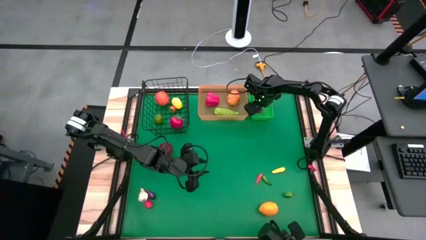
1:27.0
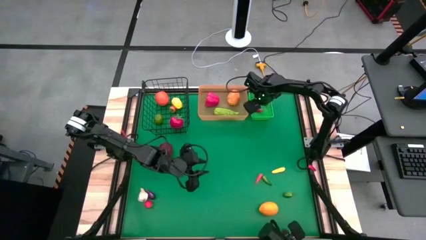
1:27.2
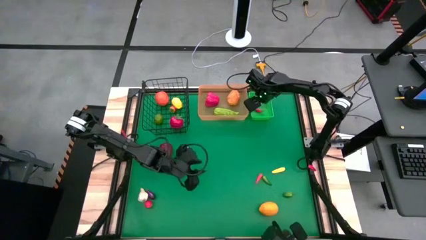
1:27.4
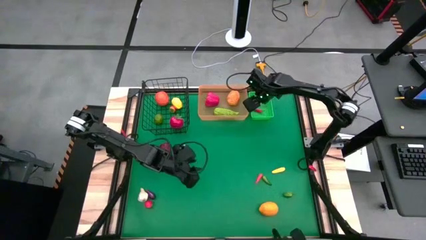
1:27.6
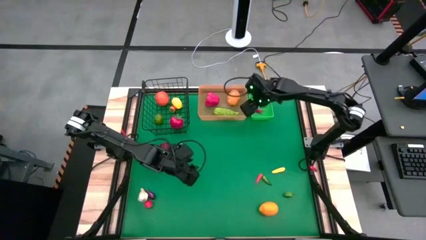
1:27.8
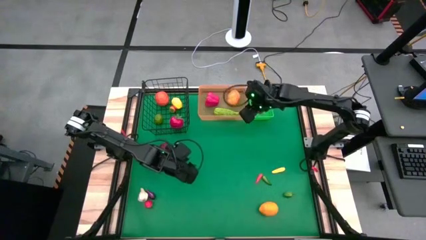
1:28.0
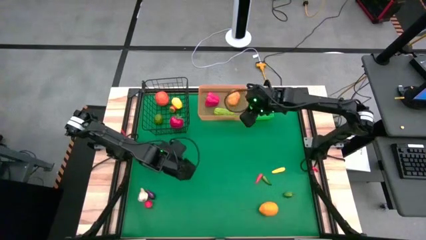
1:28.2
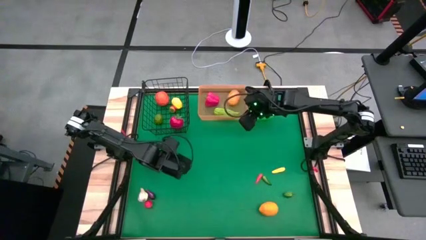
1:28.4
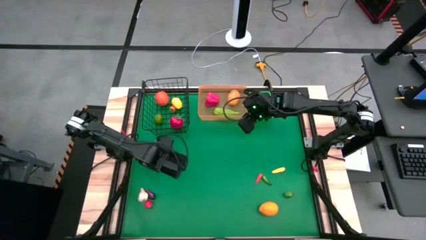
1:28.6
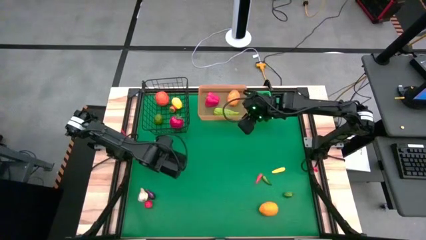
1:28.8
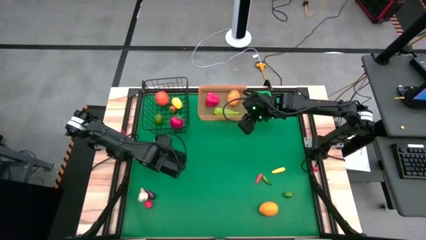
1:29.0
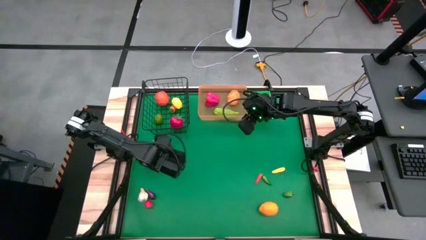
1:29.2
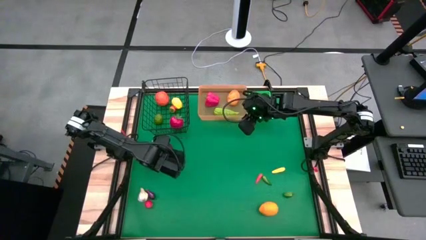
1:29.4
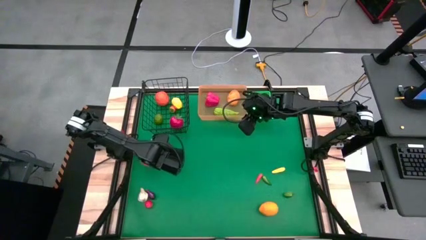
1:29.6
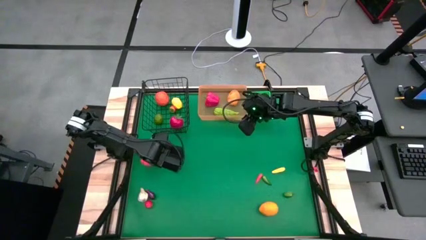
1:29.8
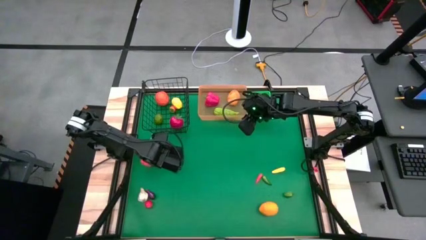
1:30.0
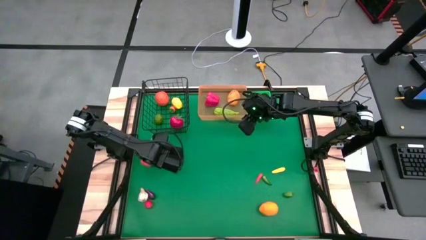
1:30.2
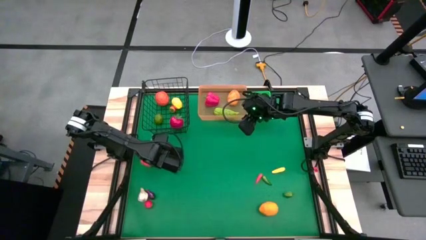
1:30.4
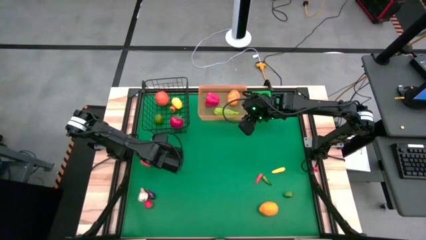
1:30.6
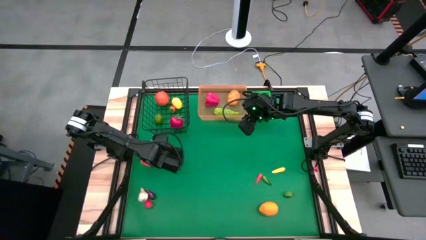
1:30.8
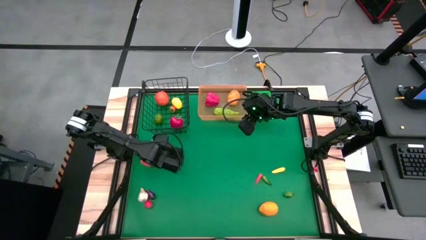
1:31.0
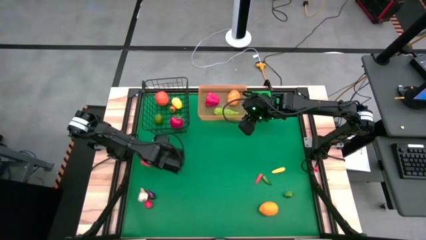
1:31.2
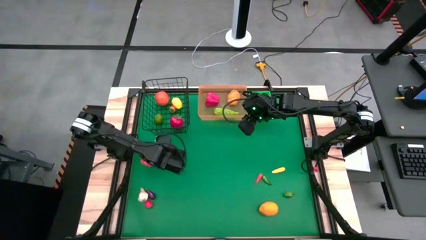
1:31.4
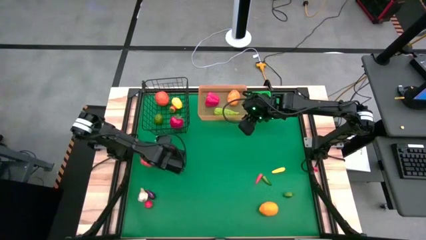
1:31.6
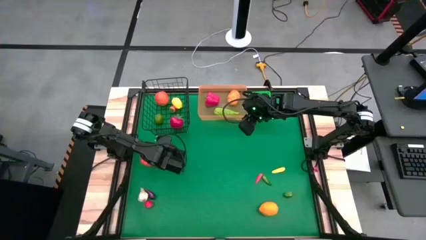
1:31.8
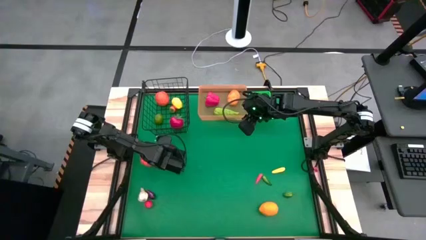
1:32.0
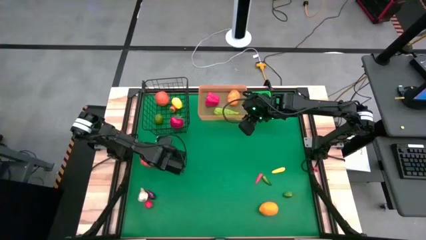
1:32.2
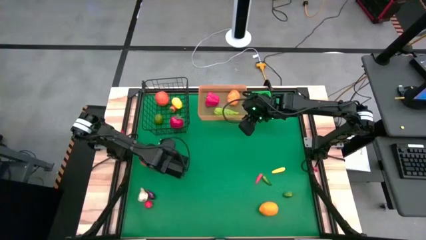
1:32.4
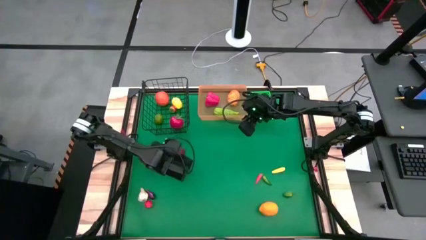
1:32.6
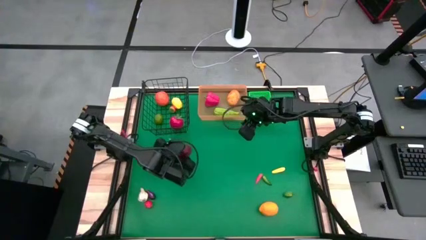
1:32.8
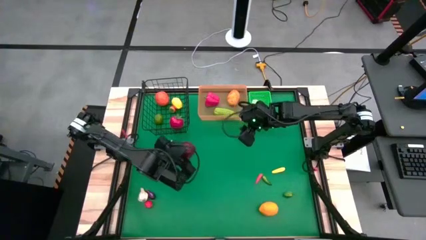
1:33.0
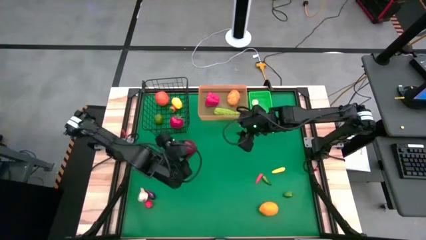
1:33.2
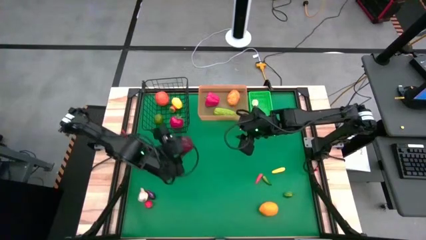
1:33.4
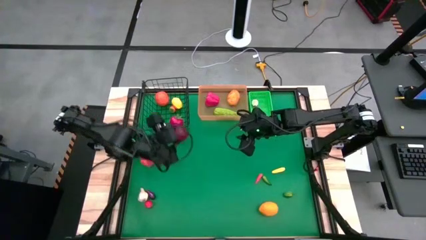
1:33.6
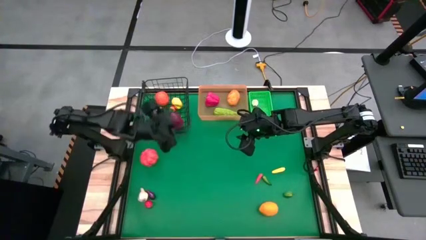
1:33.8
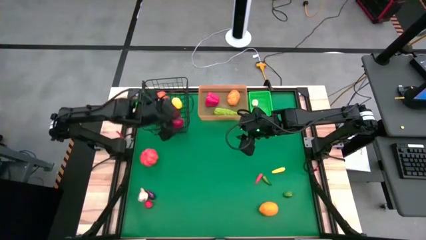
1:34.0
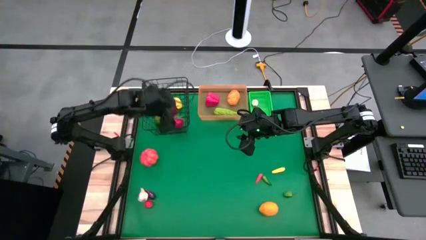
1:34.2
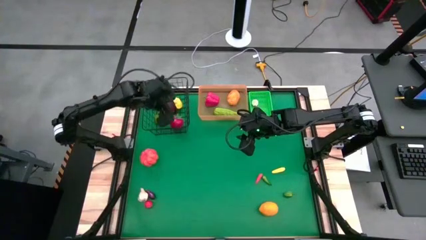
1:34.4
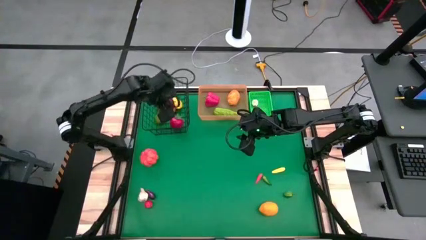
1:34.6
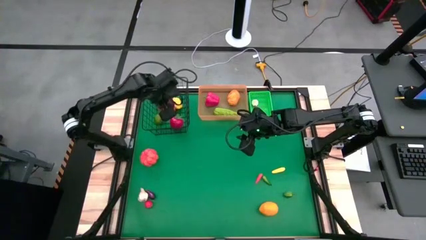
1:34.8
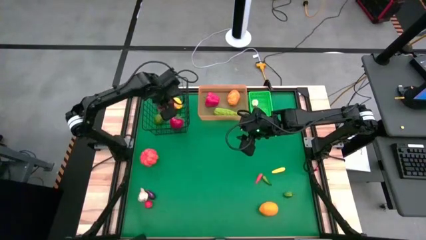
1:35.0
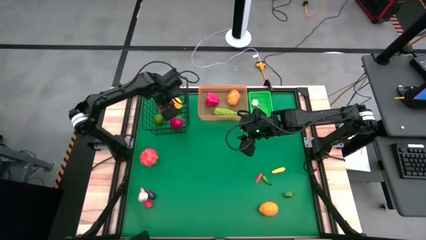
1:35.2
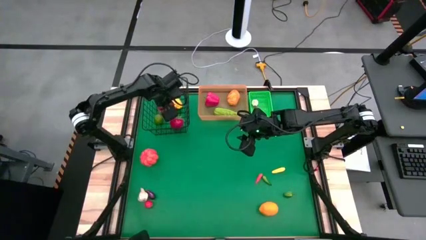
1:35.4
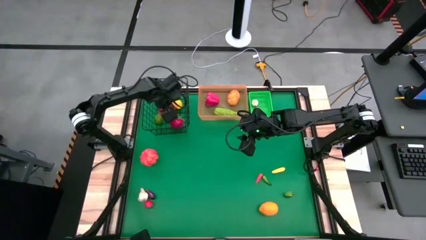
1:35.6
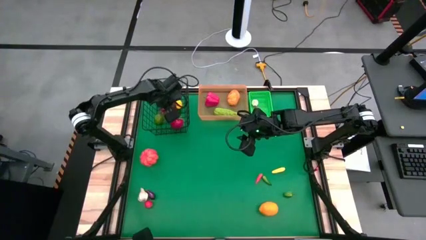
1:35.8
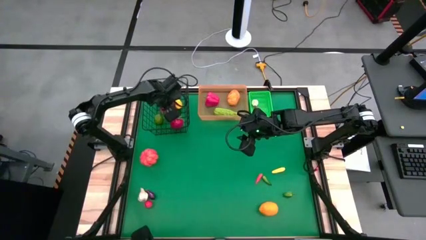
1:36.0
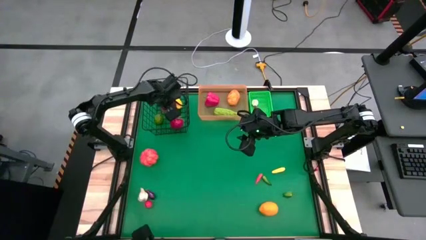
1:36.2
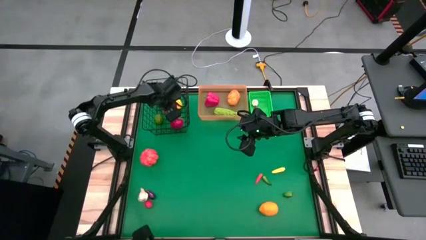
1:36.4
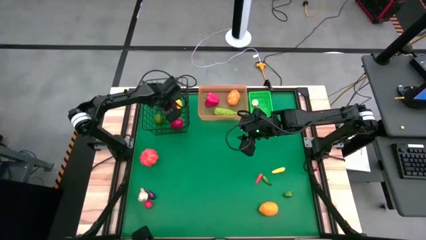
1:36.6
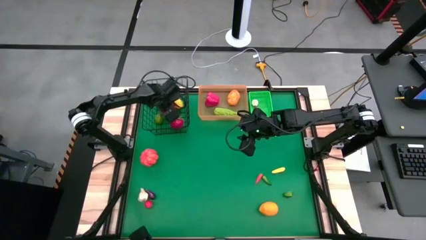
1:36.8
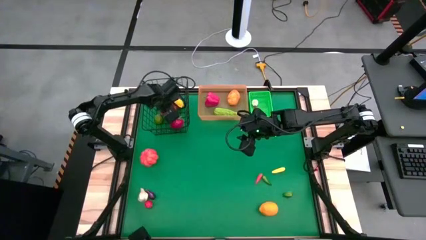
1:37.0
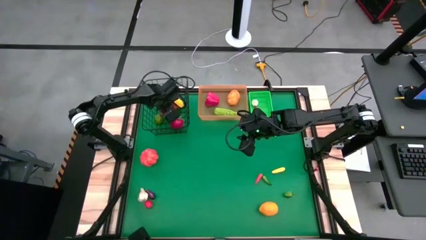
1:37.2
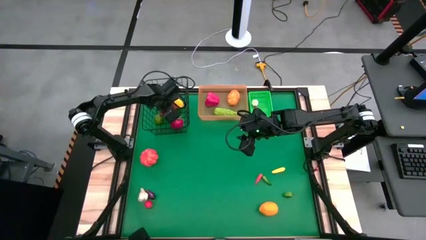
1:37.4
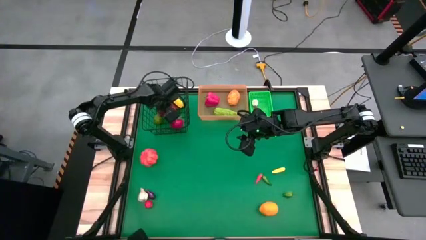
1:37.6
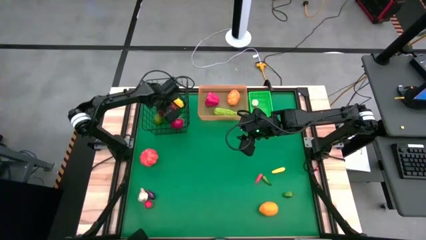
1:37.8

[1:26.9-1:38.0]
Task: Sort produce into baskets
Put the red apple into the black wire basket

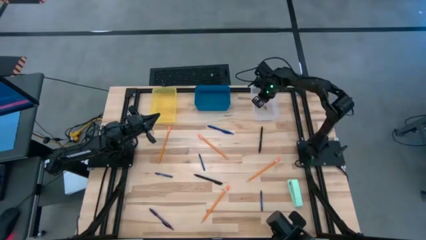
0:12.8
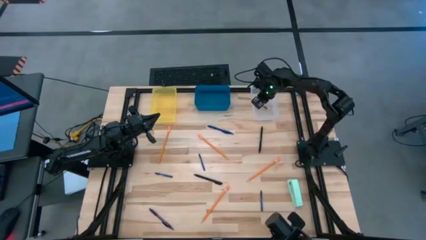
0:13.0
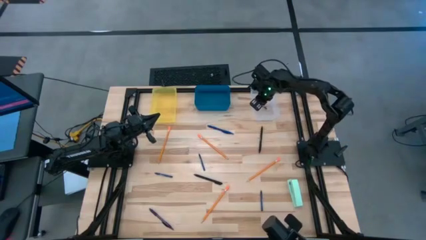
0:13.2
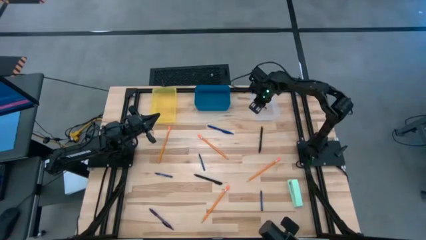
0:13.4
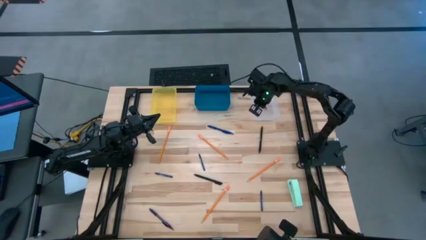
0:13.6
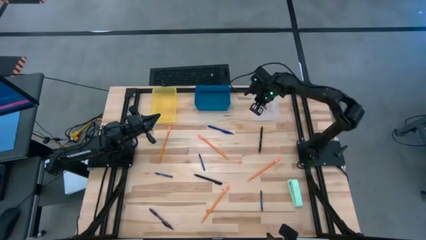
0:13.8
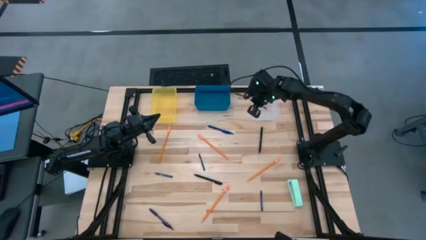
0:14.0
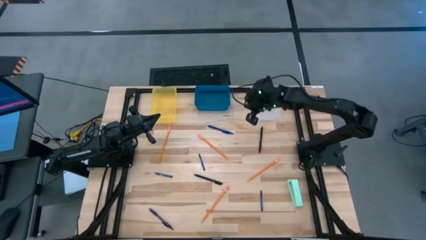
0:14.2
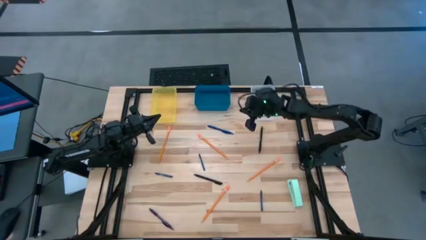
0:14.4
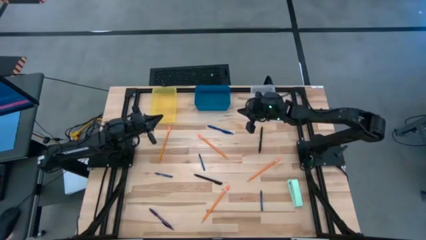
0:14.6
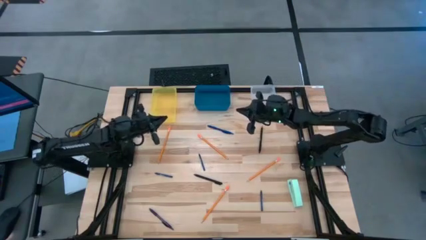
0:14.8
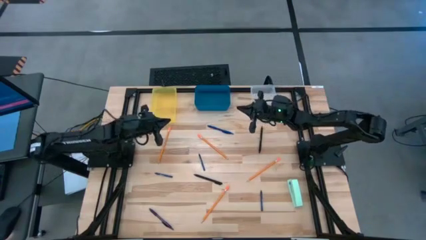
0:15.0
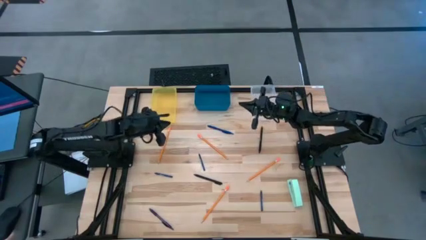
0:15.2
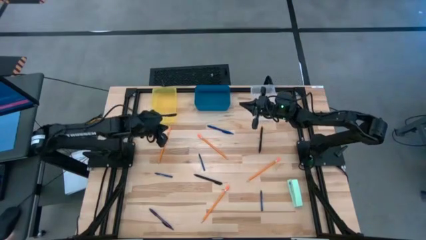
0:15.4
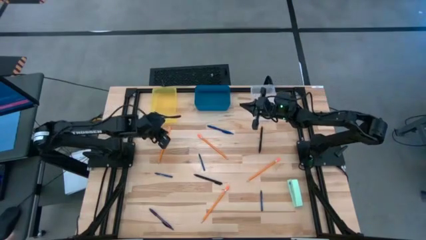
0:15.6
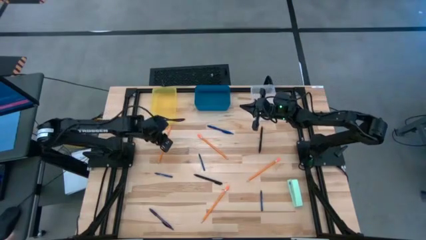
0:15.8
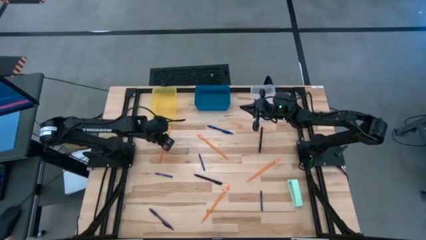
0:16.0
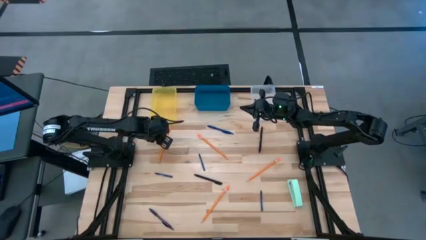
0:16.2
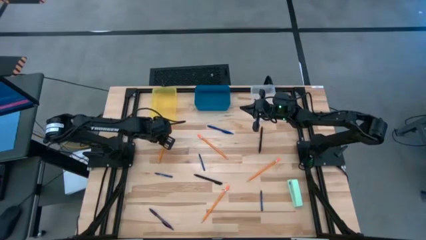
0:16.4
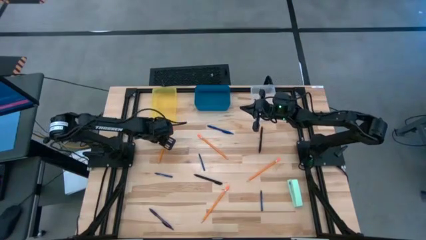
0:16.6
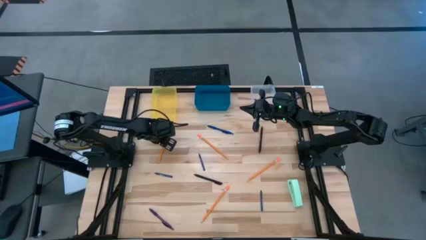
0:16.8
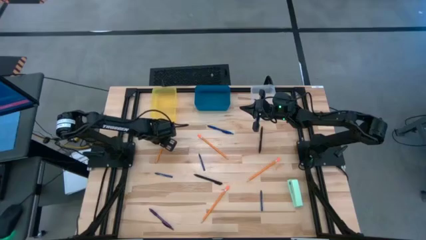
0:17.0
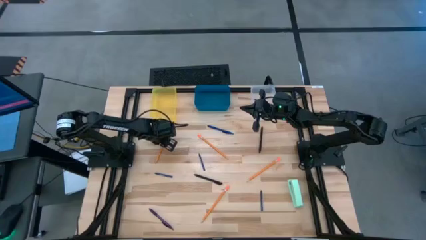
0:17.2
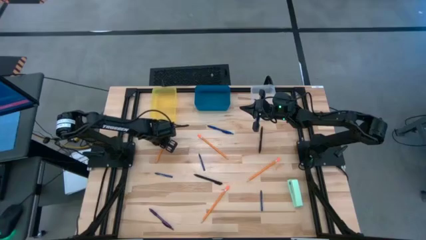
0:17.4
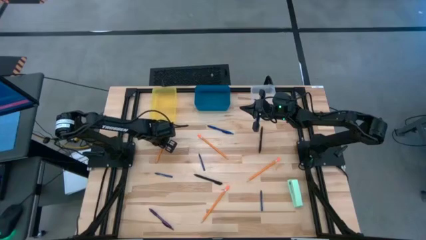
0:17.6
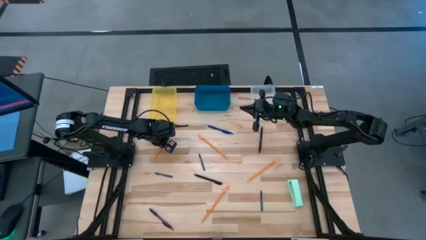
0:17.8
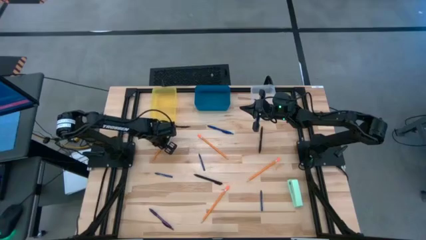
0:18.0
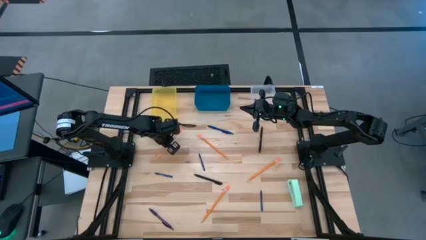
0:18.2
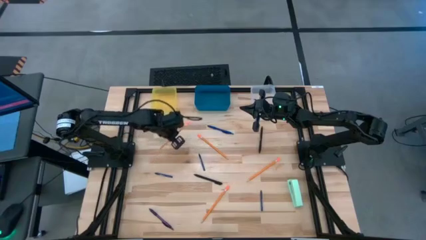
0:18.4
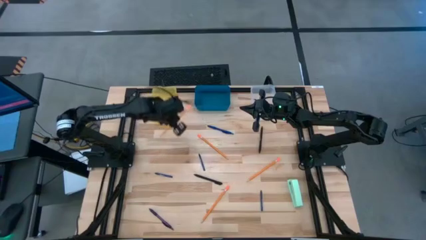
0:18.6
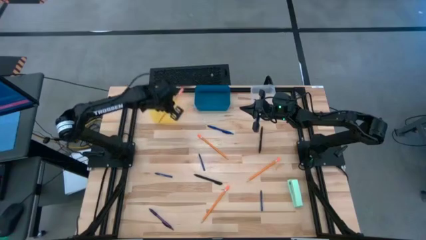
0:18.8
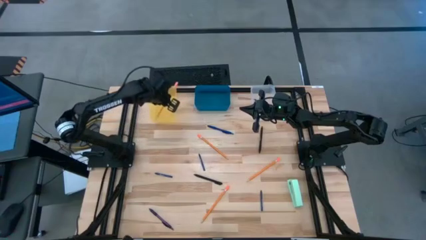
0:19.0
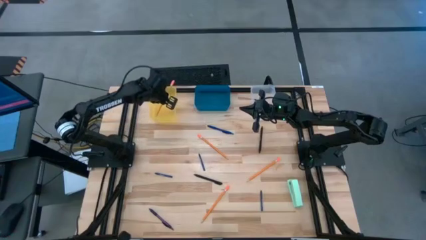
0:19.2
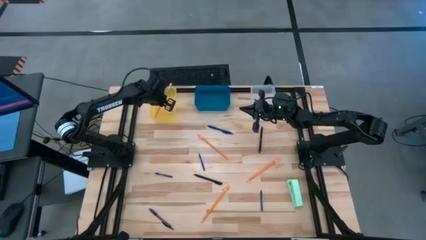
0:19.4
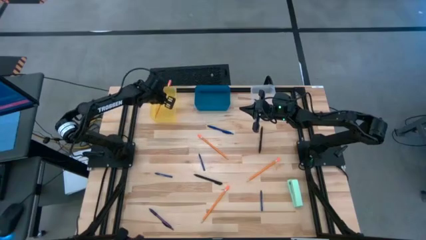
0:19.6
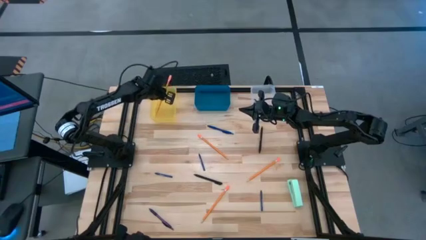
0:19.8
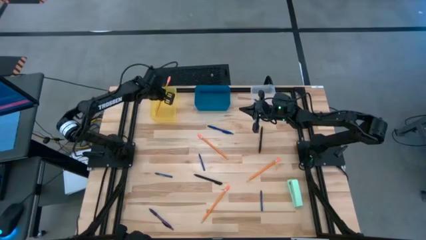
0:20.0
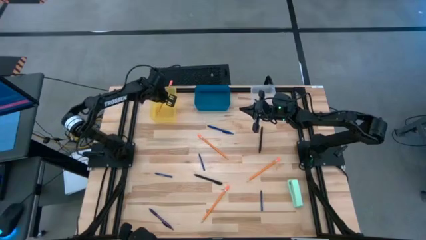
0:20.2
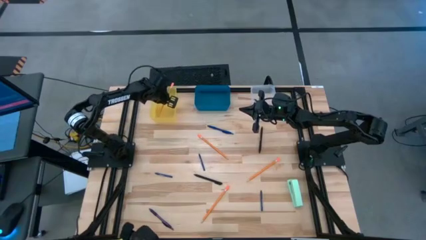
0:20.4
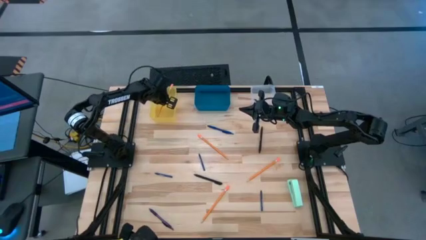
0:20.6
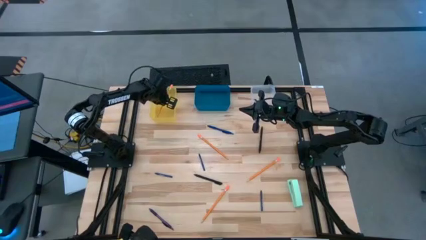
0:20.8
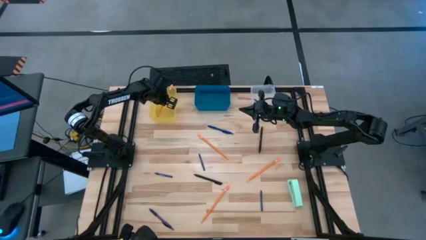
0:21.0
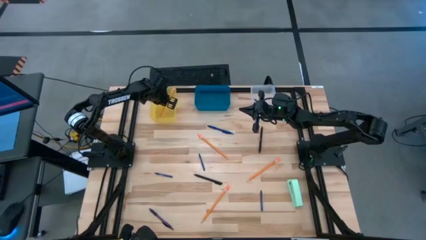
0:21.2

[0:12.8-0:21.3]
Task: Sort crayons/erasers/pens/pencils in bins
Put the orange pencil into the transparent yellow bin
